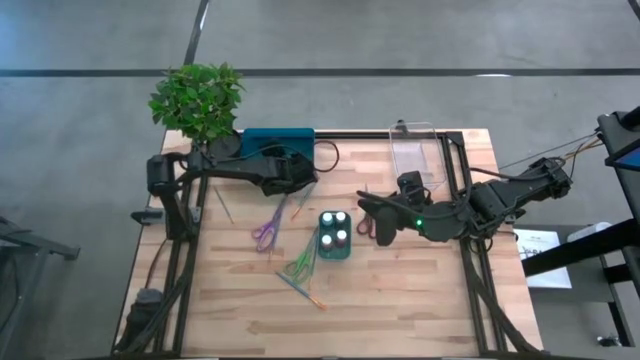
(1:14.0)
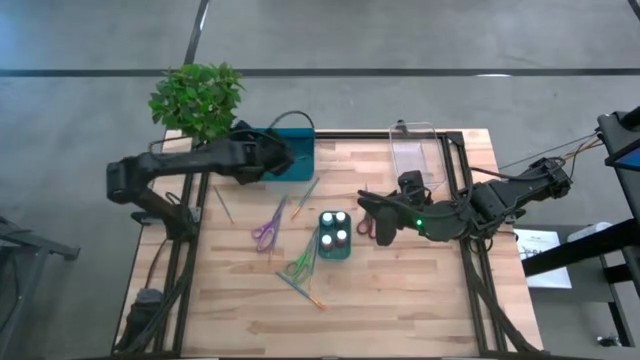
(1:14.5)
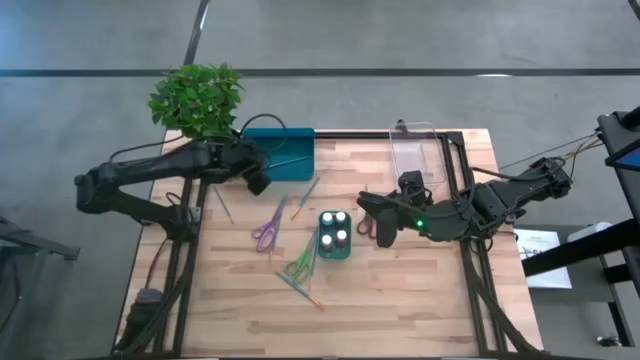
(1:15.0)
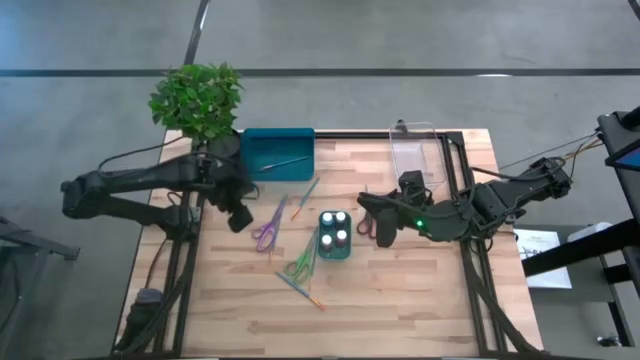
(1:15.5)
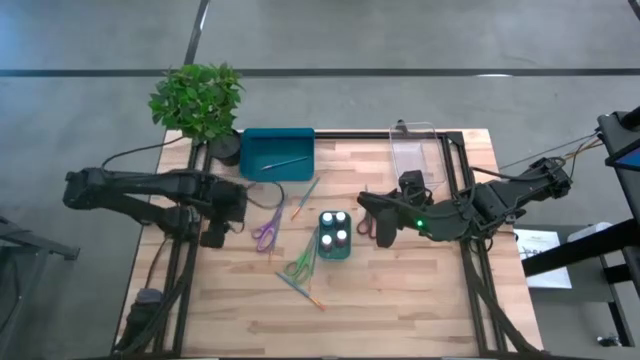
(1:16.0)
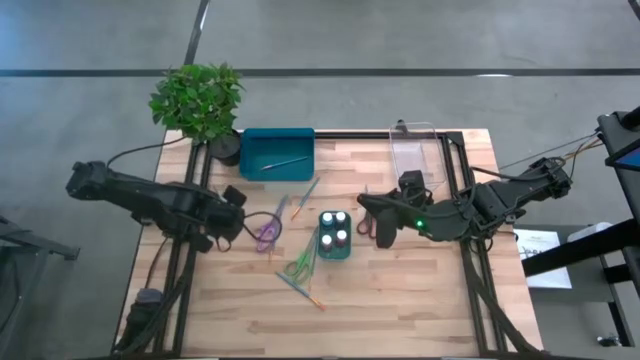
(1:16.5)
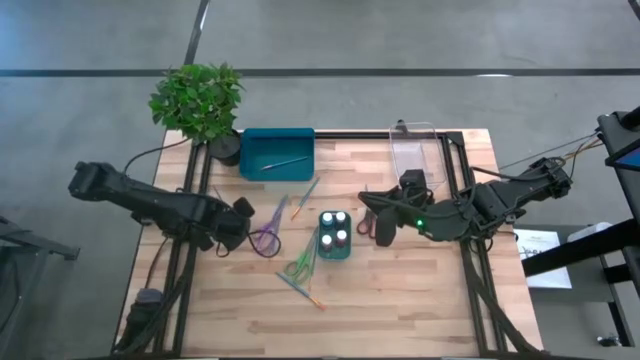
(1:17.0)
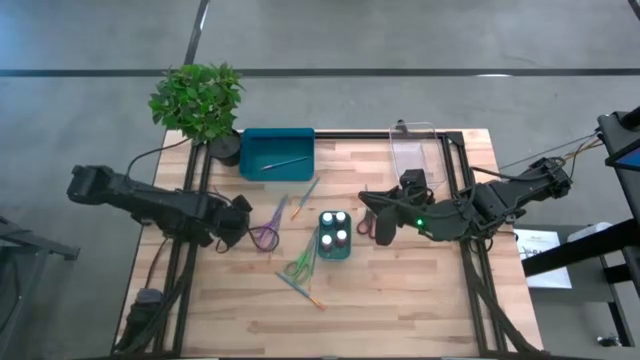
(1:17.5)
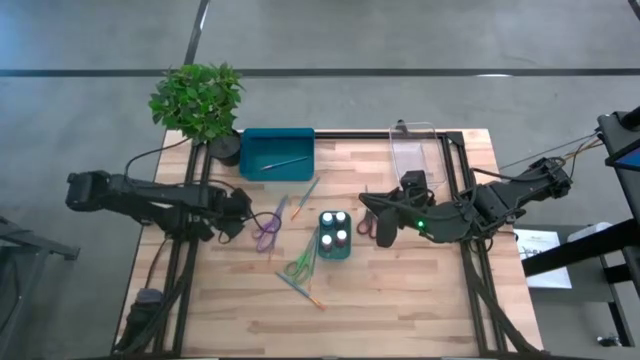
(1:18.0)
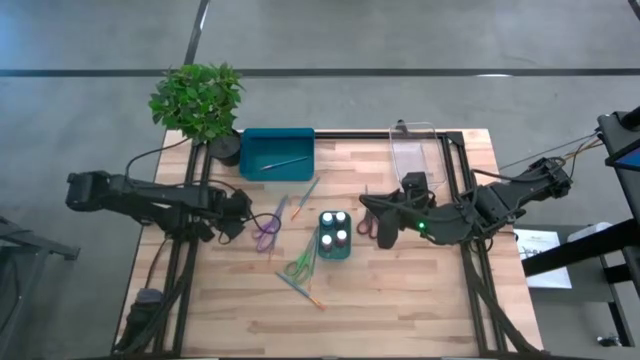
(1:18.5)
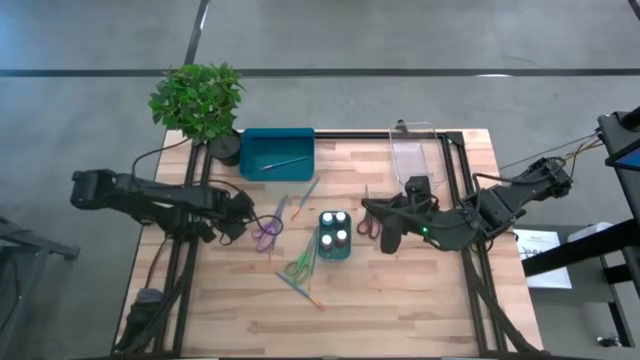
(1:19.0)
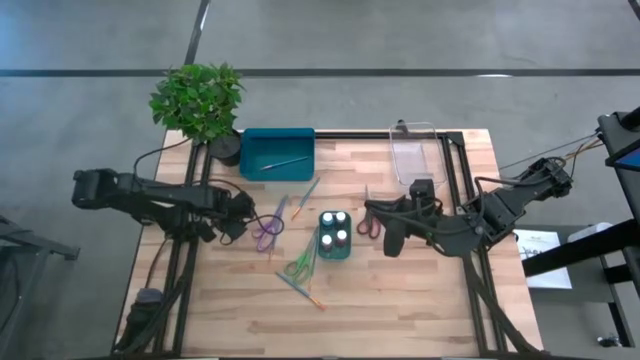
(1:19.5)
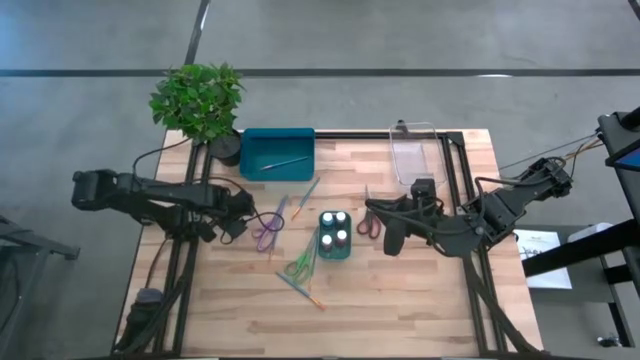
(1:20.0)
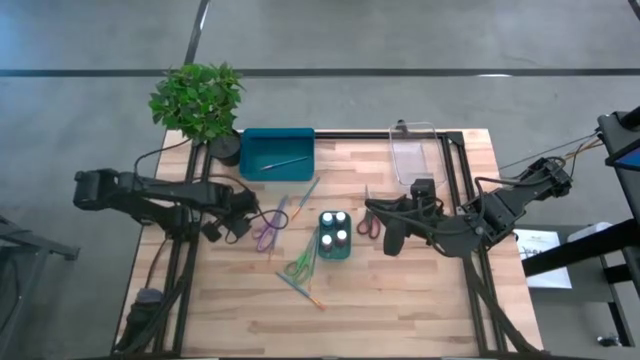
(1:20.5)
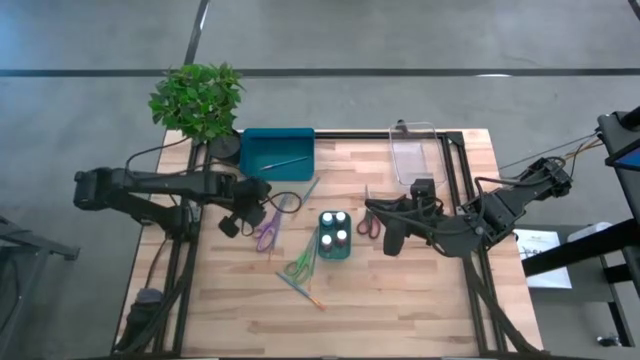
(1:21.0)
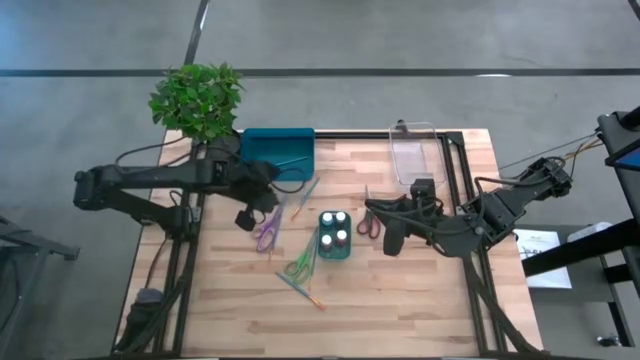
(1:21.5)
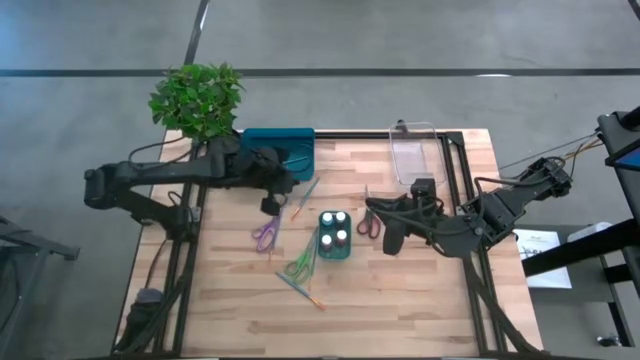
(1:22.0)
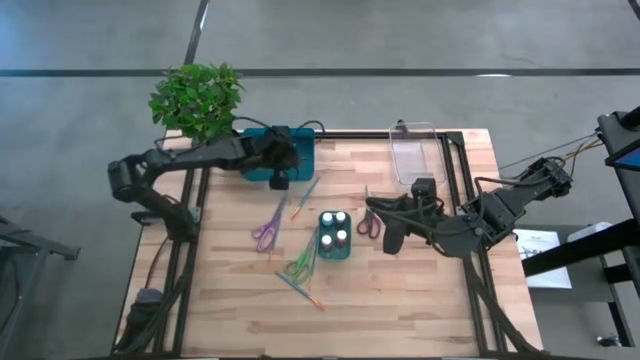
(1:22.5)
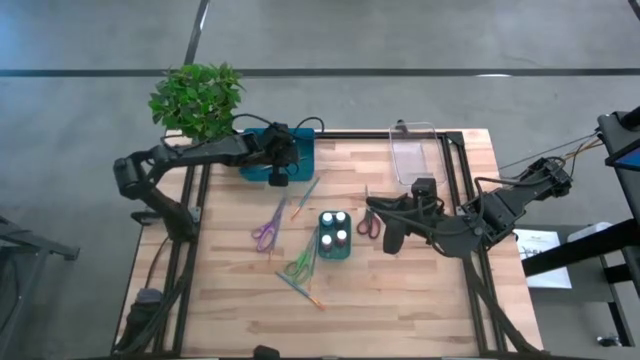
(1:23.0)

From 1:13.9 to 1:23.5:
Task: Pick & Place Paint Supplies
Put the left small blue paint brush into the blue bin

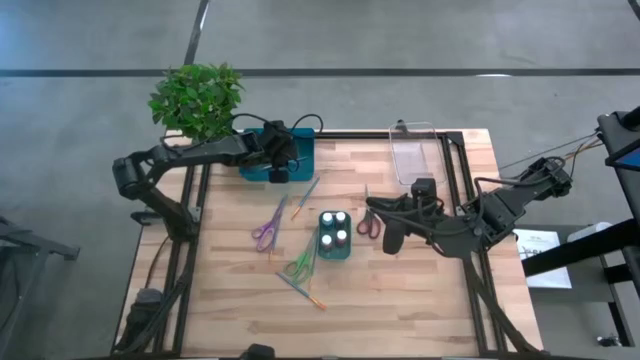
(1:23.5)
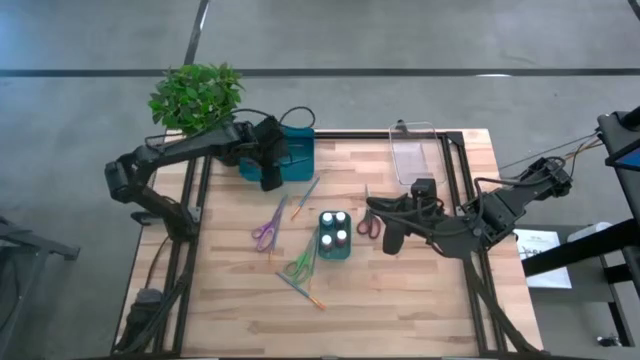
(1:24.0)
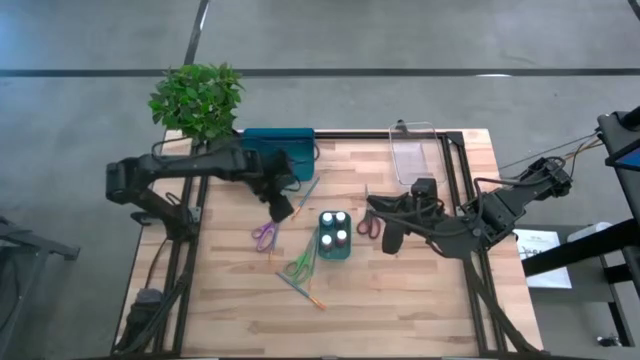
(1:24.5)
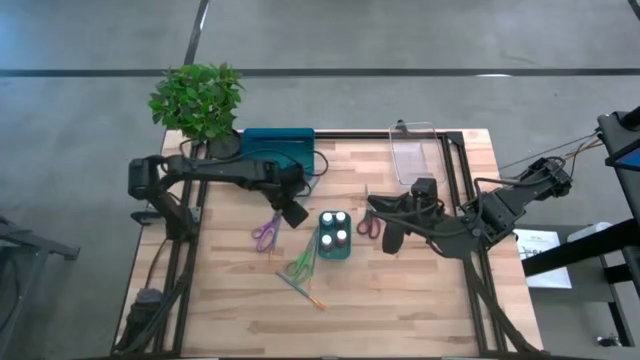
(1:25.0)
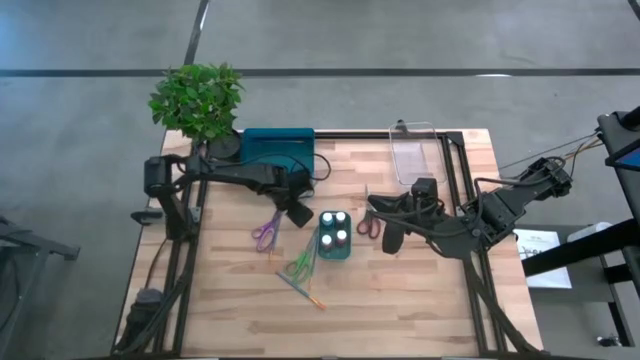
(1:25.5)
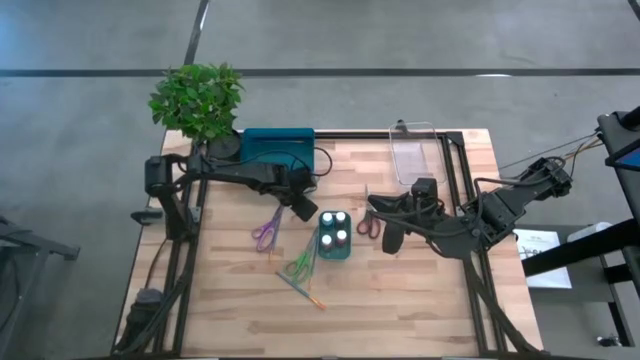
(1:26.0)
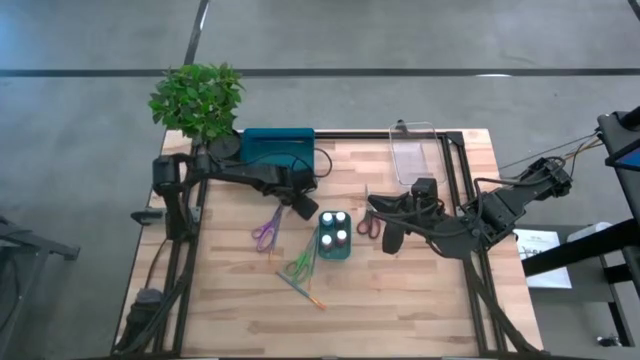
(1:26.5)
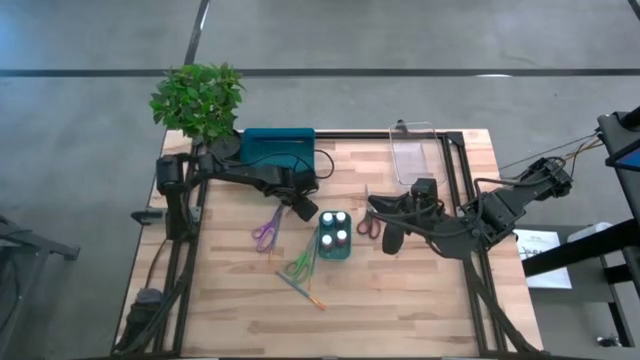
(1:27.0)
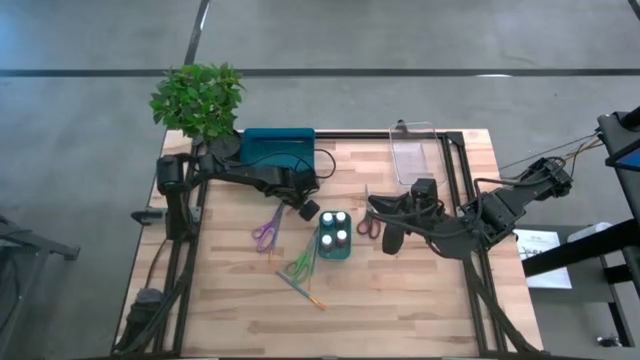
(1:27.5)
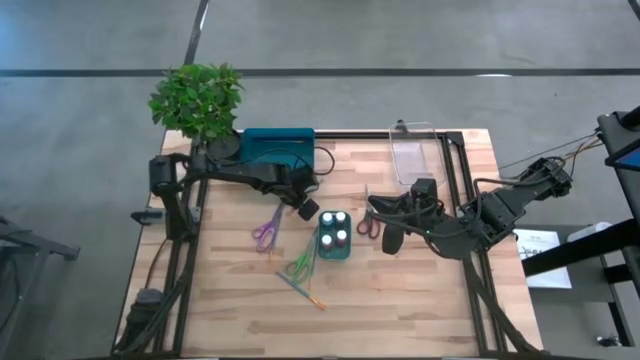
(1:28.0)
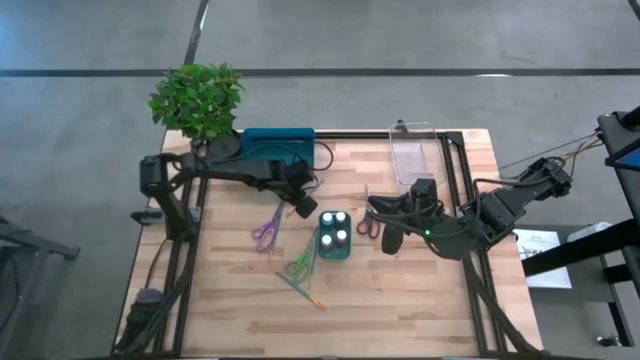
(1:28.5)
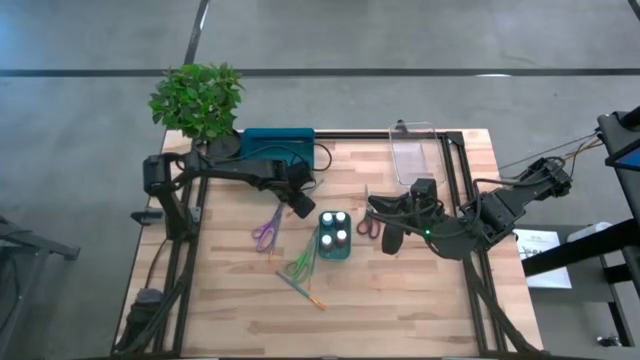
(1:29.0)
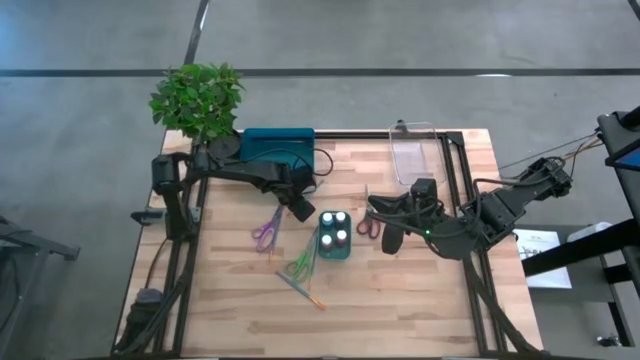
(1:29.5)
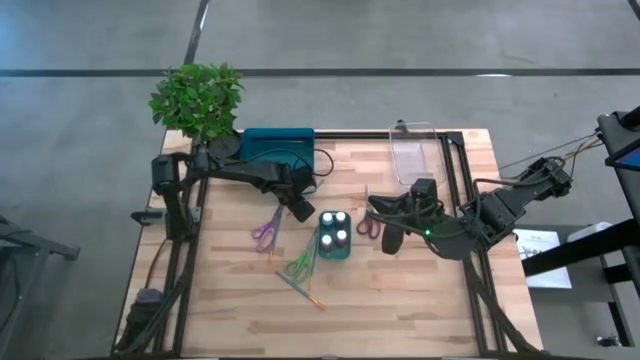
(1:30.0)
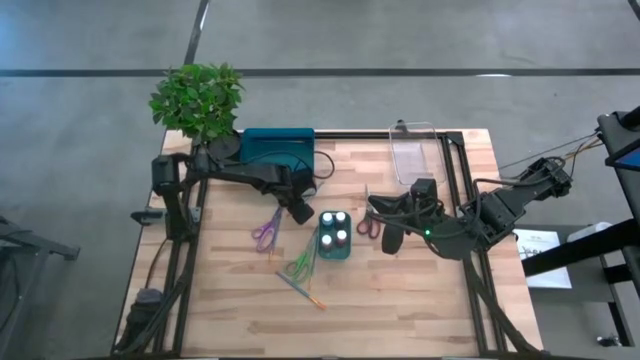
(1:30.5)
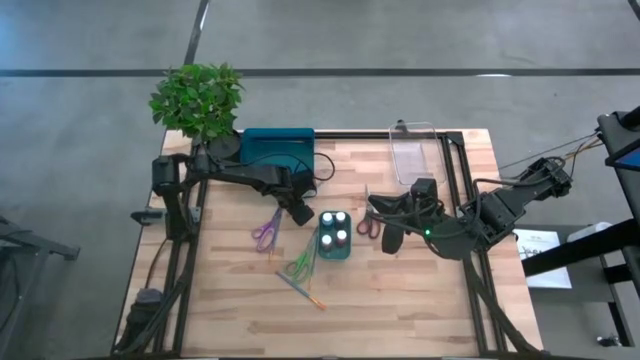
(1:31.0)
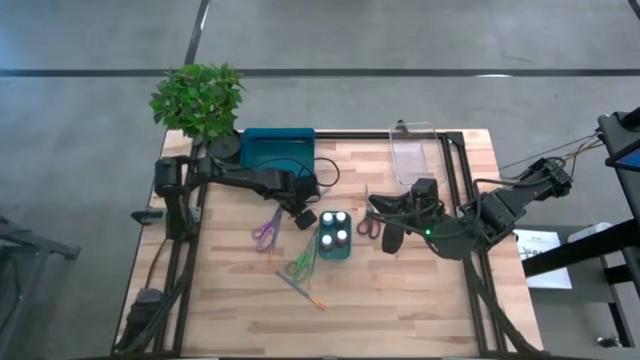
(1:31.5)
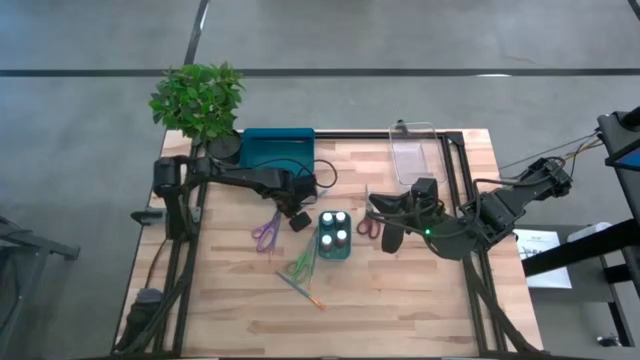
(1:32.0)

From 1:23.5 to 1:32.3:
Put the top big blue paint brush into the blue bin

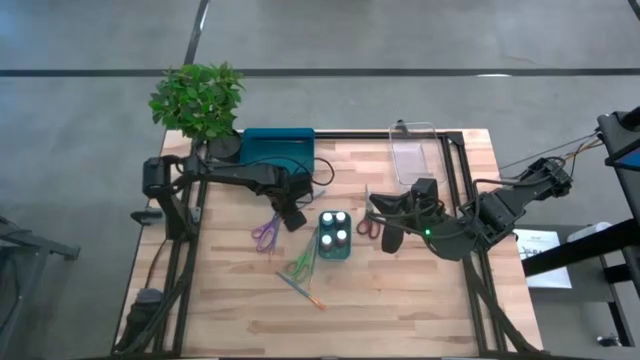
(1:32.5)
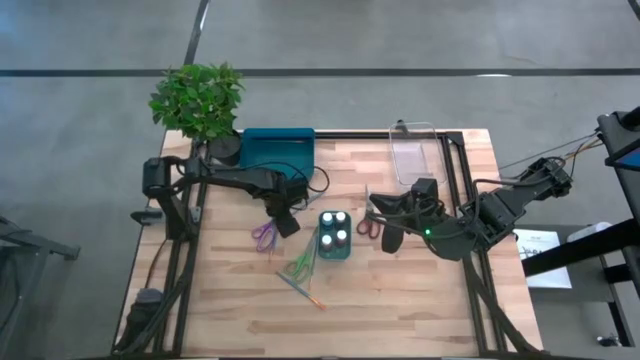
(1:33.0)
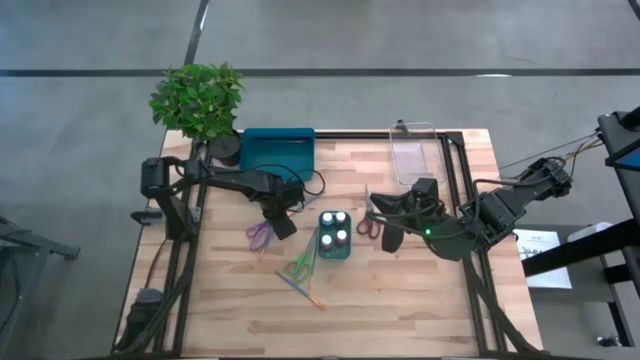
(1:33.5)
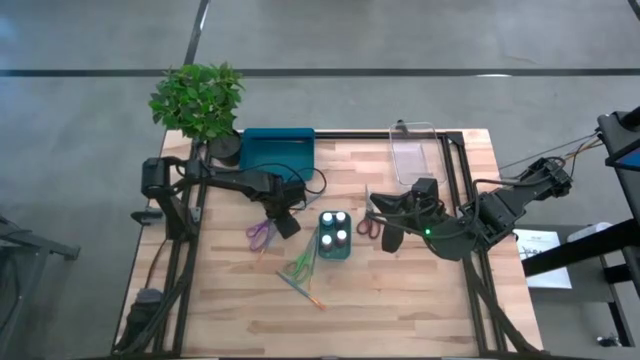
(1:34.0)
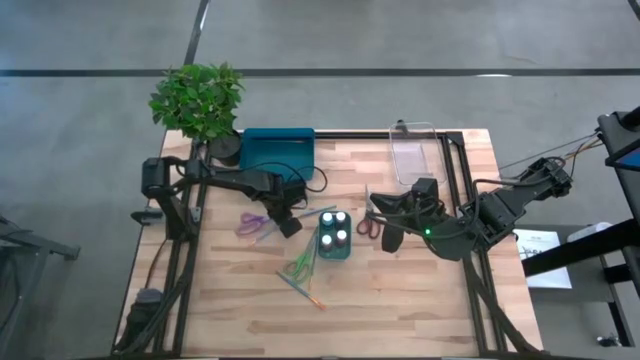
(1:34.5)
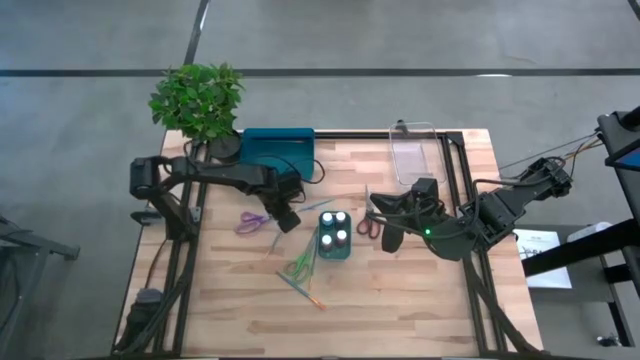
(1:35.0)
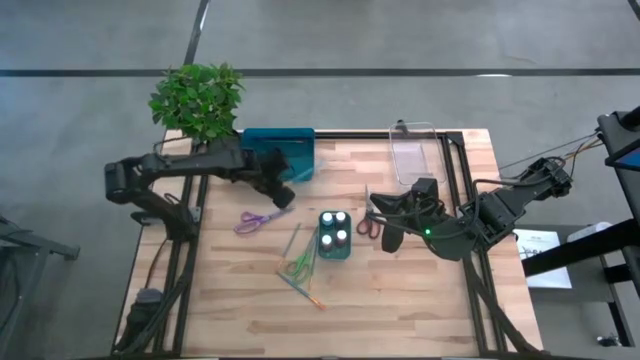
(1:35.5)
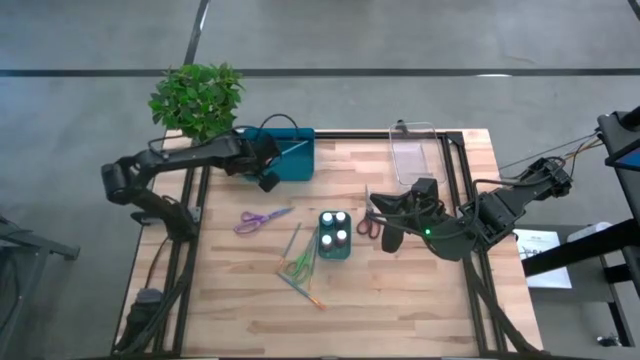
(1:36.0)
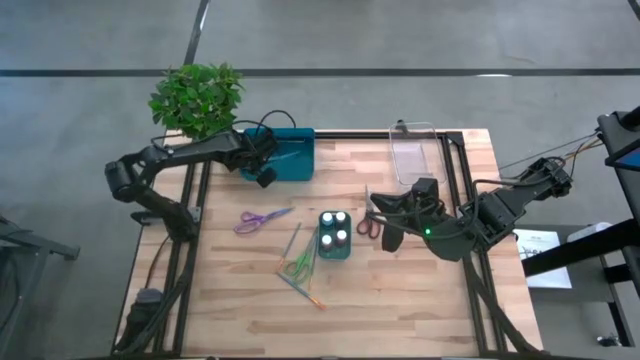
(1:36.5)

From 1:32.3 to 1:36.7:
Put the top big blue paint brush into the blue bin
